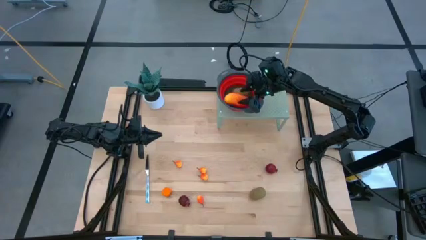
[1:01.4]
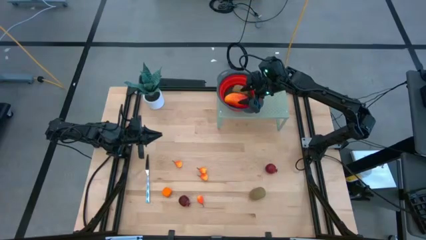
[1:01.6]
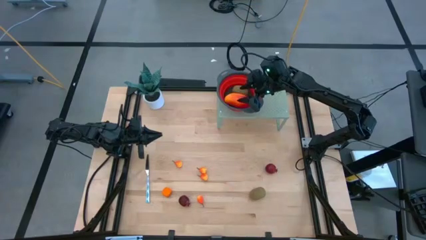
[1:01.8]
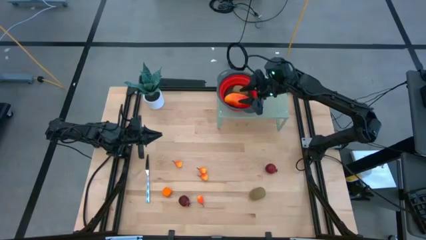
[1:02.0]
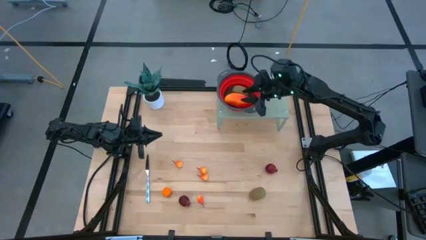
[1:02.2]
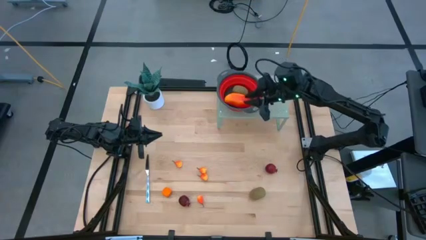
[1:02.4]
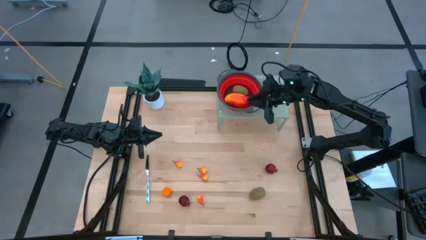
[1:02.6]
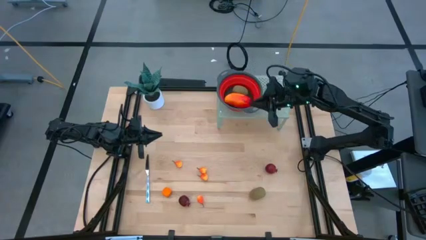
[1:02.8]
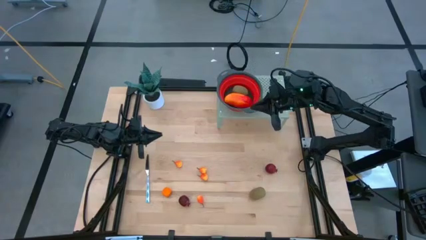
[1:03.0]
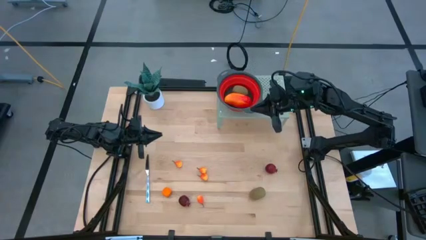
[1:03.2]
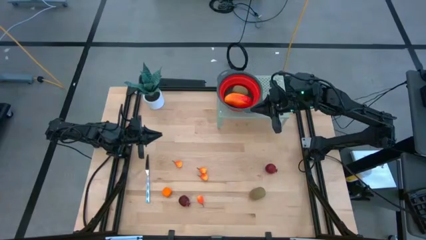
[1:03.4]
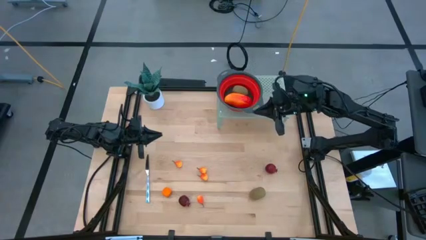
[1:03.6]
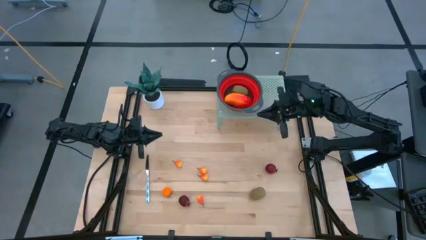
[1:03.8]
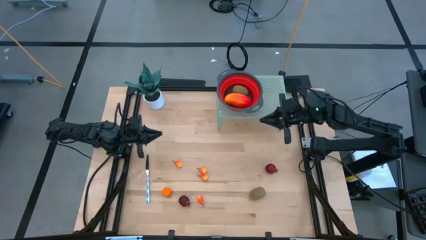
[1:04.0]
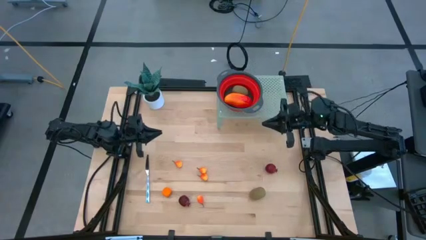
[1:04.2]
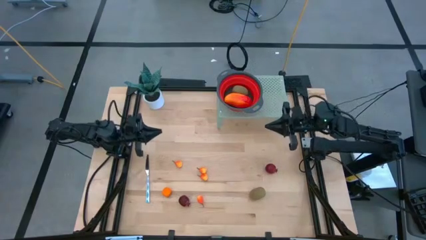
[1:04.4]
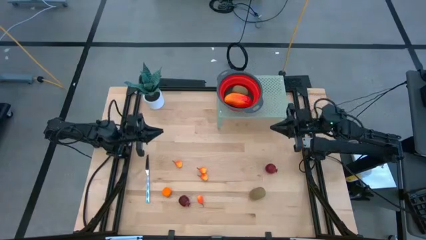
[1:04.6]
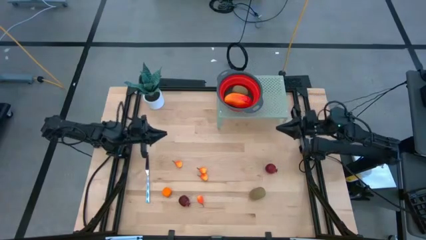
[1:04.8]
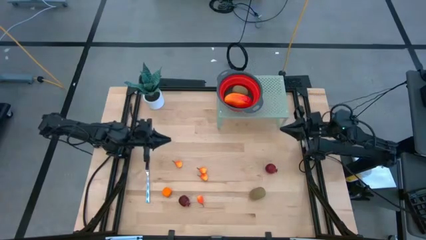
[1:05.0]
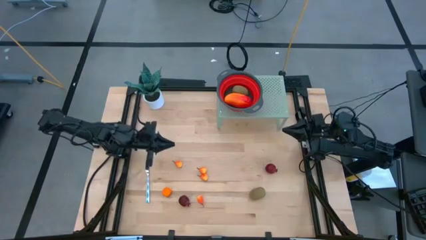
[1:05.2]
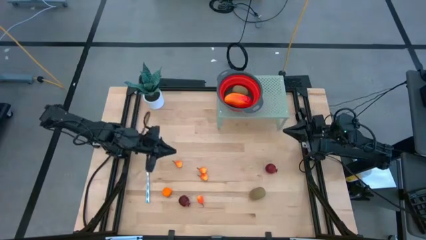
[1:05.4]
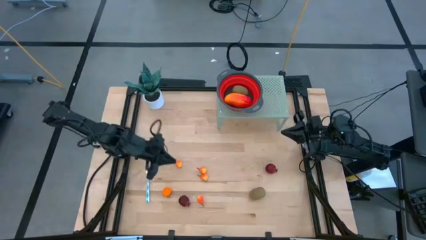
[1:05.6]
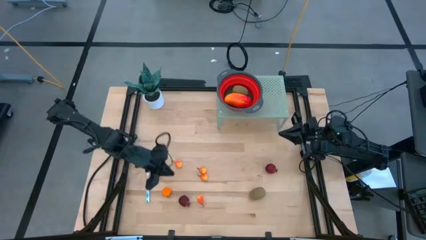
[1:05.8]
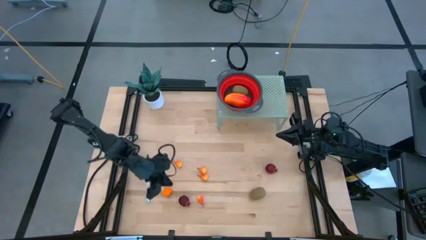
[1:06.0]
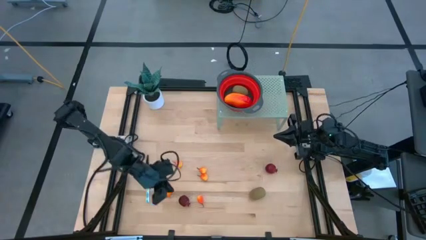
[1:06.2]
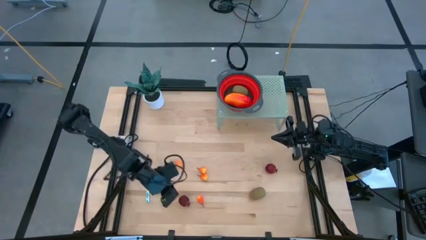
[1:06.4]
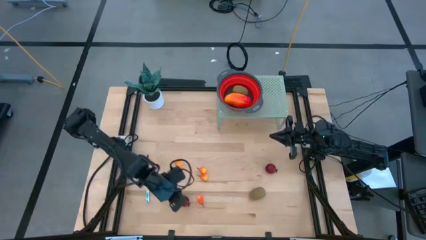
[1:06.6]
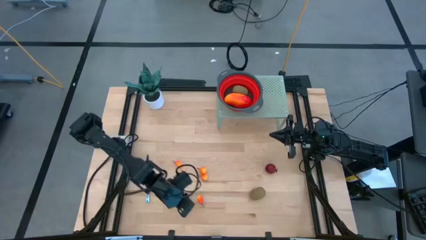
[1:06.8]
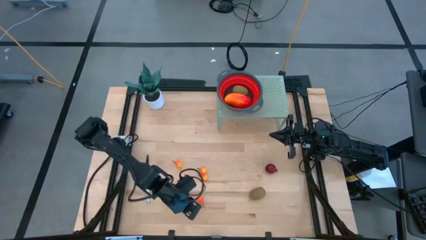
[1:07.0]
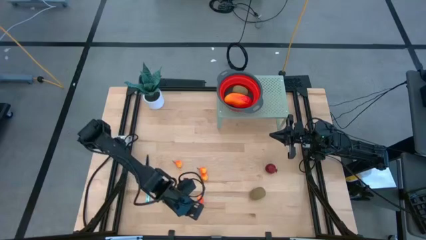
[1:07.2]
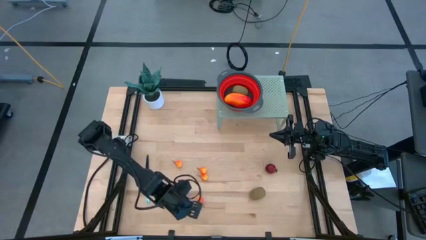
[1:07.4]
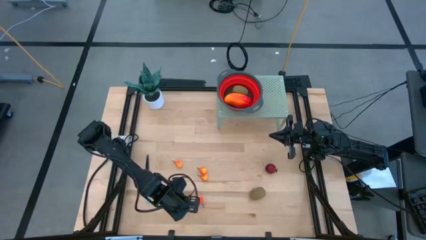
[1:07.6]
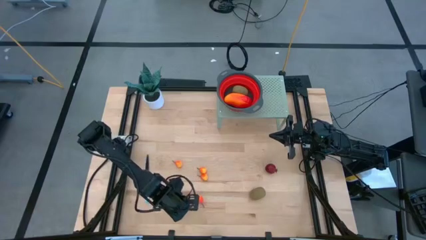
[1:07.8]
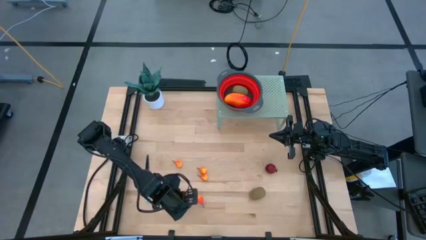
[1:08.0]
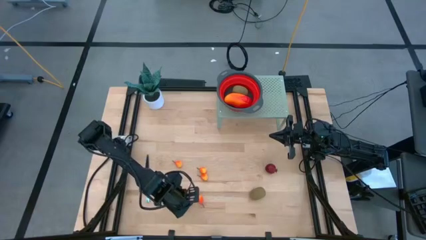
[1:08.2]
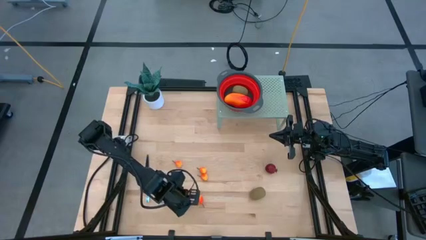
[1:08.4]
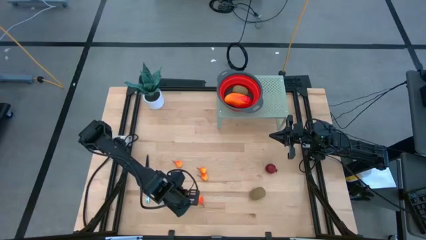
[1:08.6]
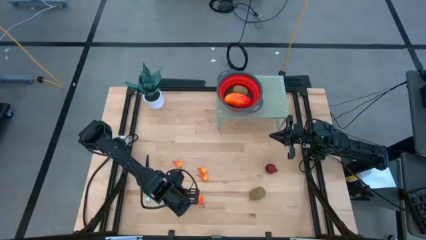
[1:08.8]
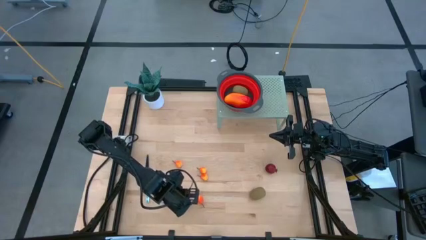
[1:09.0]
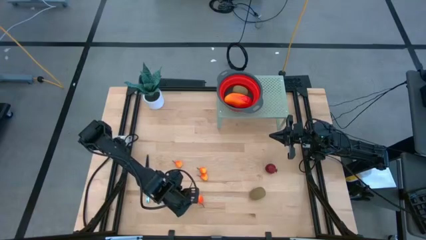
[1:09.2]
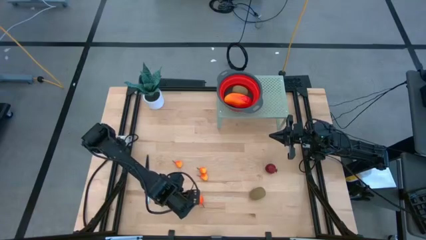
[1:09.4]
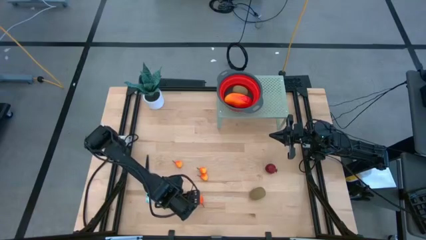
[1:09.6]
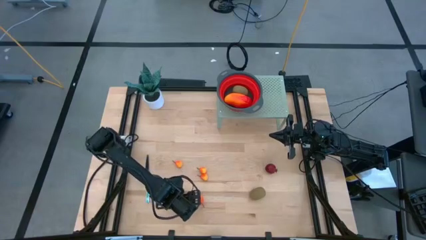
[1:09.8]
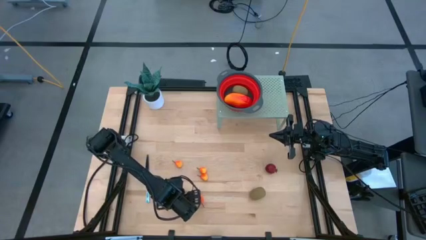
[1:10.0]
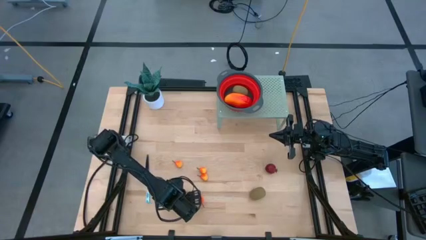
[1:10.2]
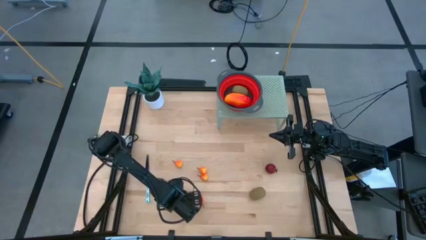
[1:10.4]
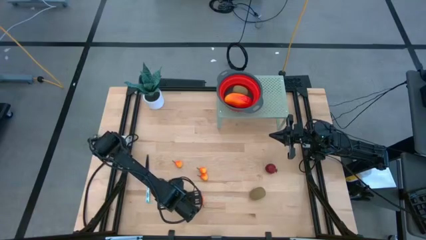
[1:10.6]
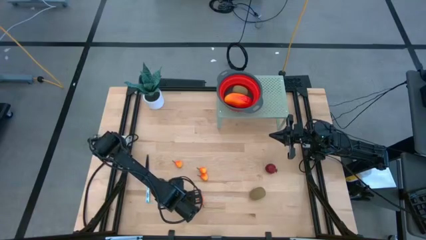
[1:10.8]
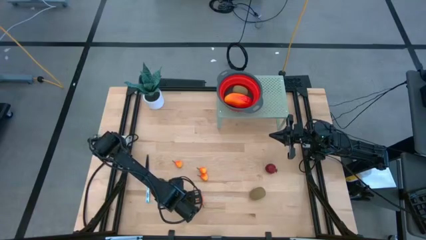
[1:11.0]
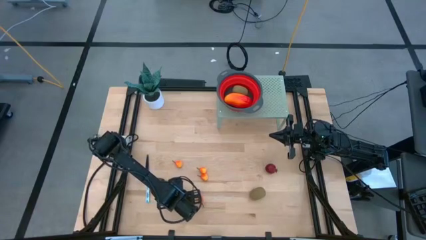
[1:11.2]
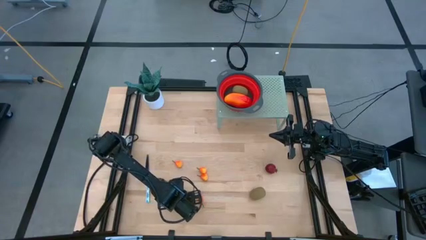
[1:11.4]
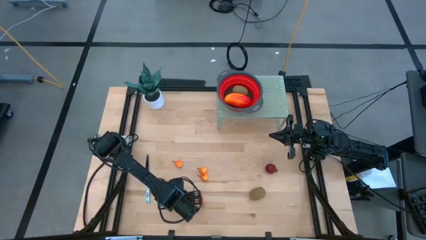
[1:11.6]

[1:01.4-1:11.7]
Task: Pick & Place Fruit
Put the top red pomegranate into the red strainer bowl on the shelf
